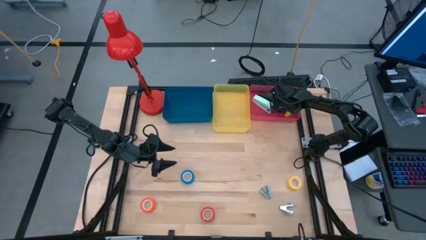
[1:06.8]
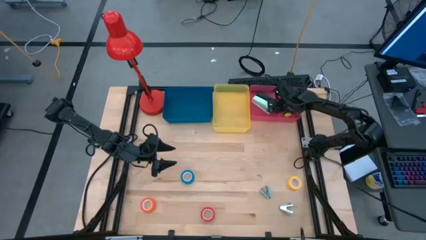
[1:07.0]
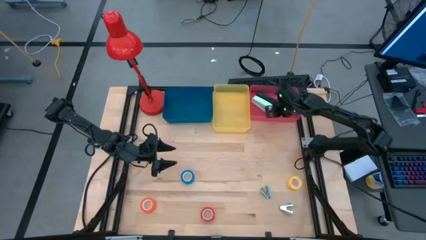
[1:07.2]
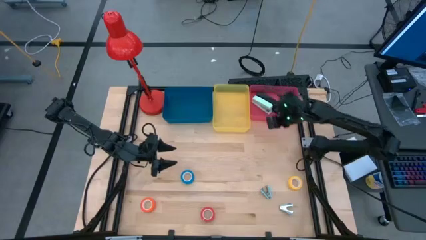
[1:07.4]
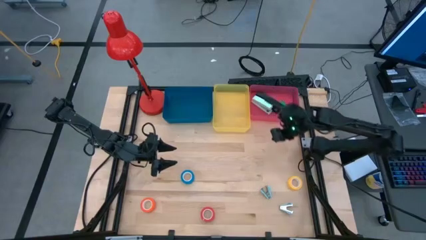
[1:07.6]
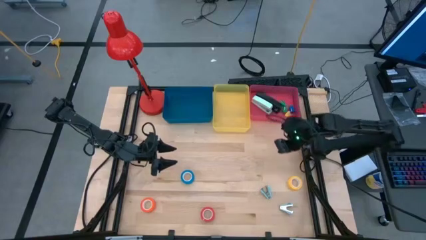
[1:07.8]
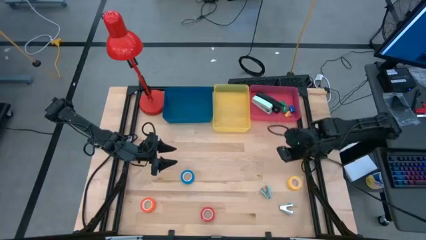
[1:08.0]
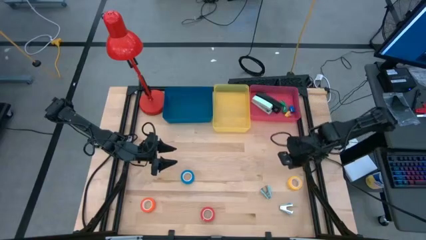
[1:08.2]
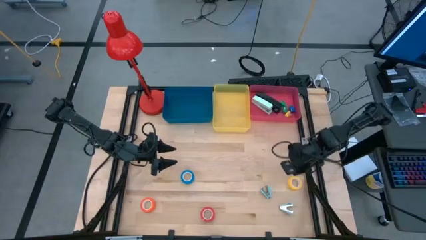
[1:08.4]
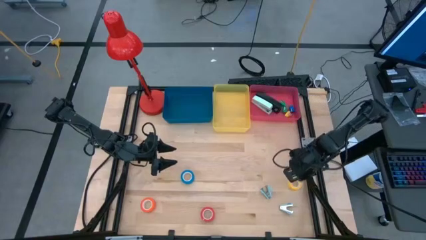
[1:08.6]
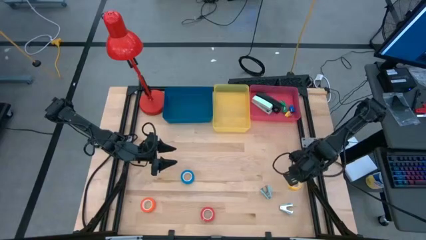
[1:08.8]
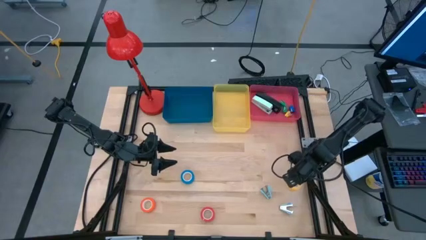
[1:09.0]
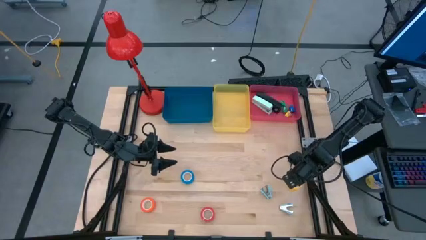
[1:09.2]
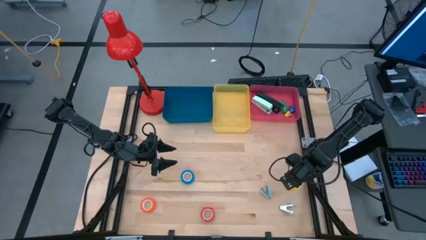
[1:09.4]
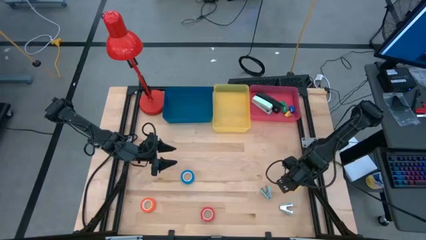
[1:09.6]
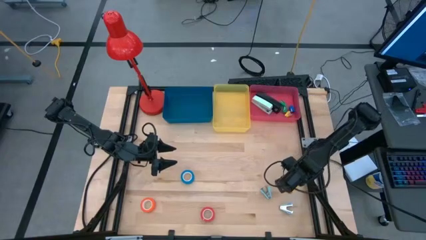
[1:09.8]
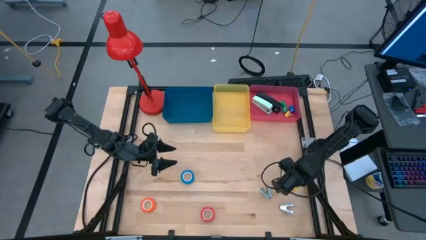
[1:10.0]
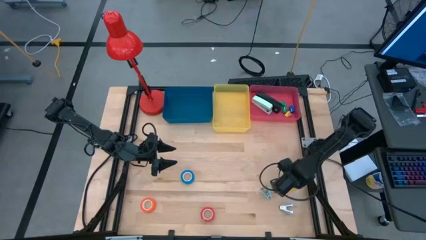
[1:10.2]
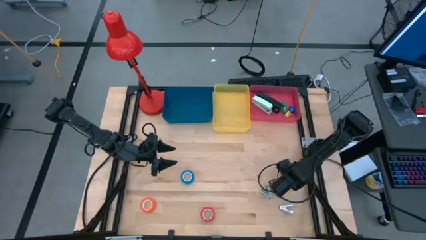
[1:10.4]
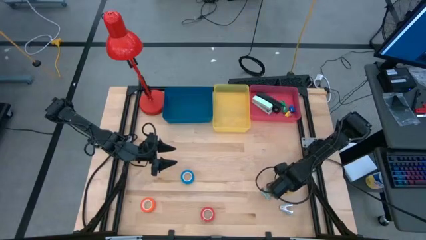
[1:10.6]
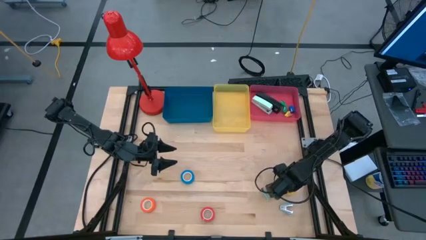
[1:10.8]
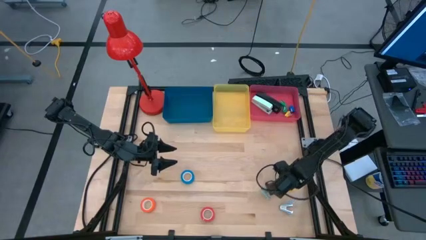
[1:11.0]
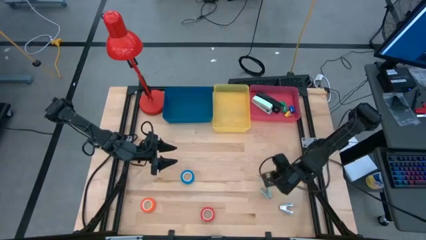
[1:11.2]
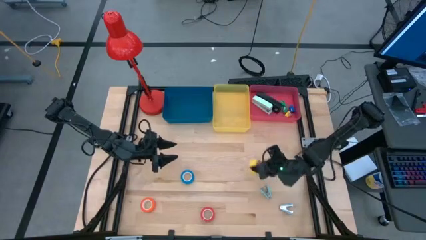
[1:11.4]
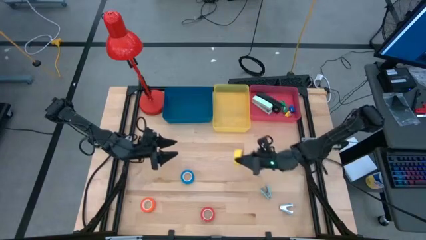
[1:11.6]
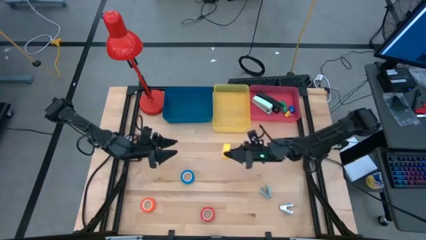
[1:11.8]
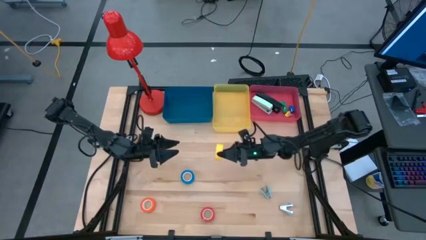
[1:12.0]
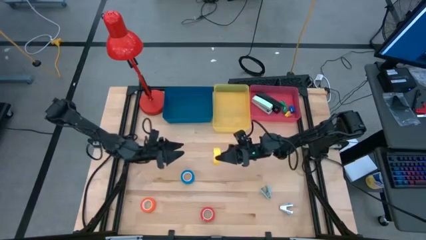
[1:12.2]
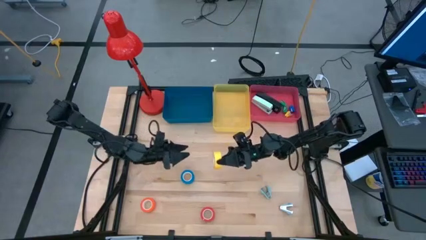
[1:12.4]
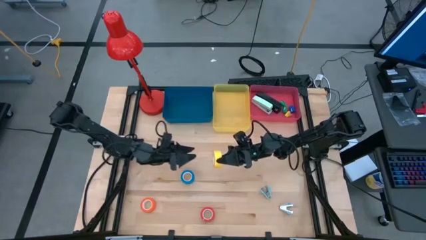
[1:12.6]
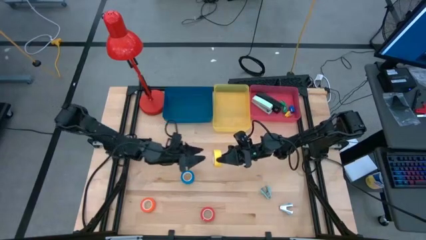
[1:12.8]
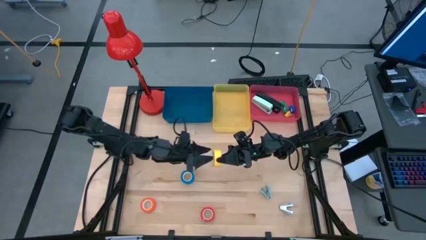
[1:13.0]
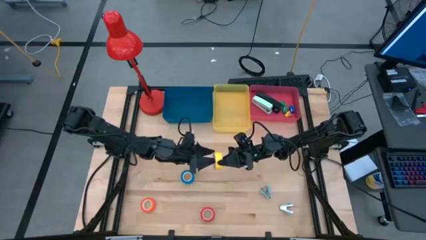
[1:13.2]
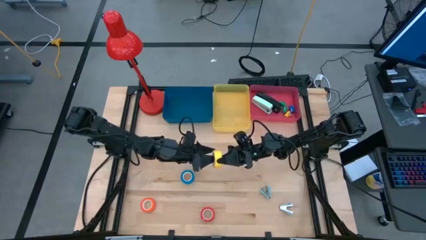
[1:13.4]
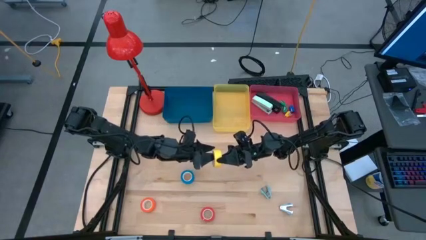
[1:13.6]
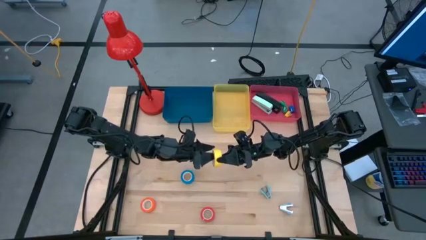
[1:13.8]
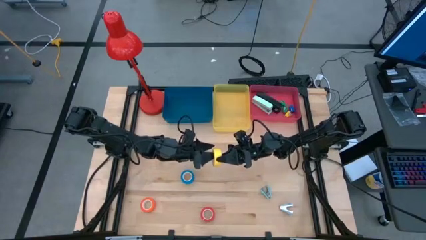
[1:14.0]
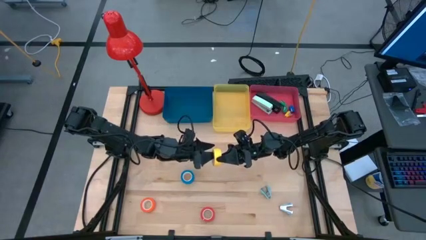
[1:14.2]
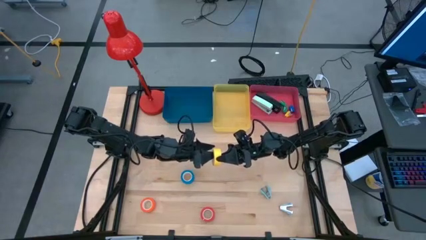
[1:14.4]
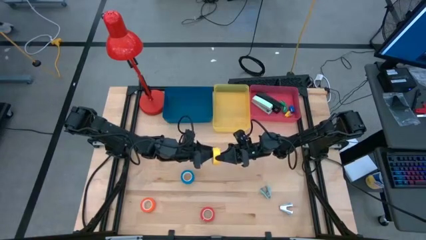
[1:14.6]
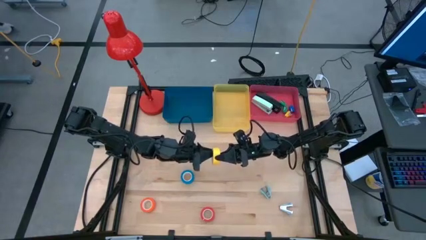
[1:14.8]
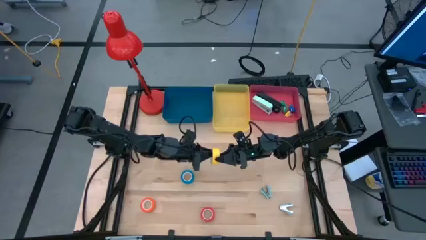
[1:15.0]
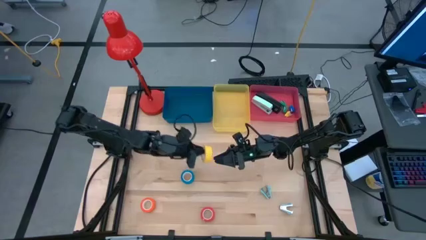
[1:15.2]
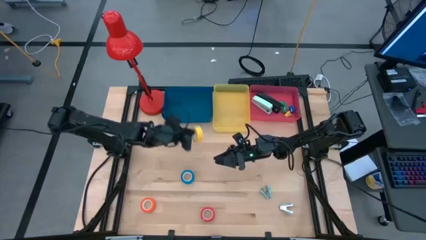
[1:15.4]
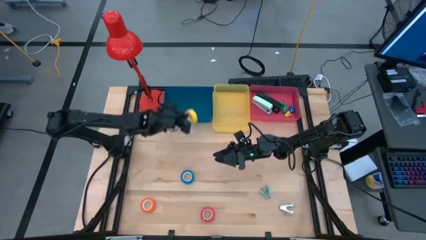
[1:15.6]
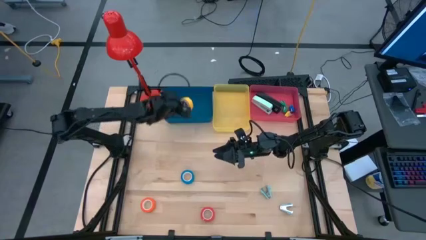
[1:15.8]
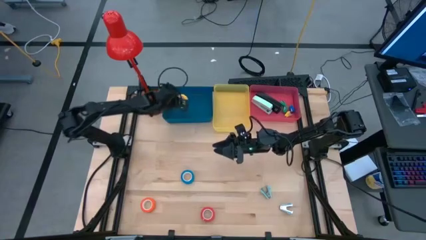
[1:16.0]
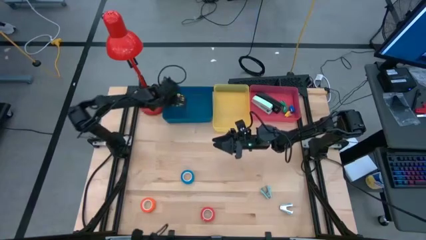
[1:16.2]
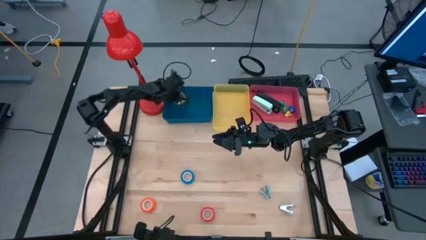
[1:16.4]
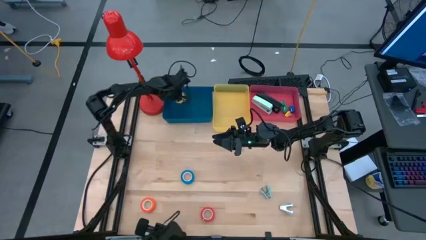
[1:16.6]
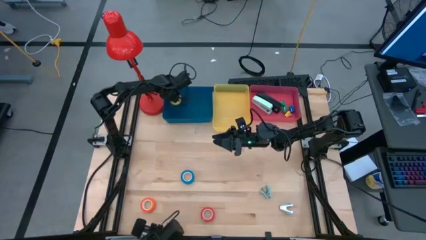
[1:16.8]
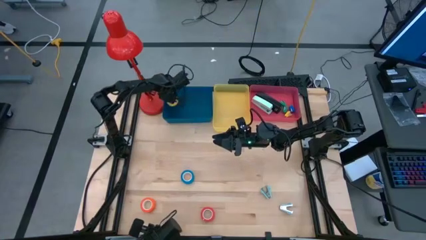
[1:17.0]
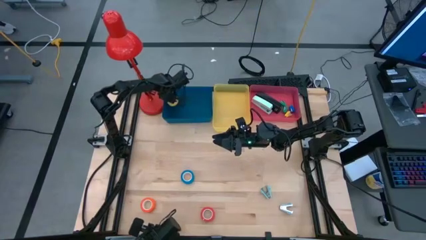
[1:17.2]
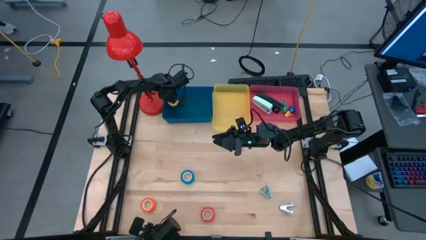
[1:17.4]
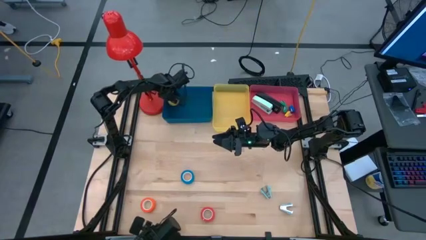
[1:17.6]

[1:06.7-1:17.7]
Task: Pick and place Stapler, Stapler remover, tape
Put the yellow tape into the blue bin

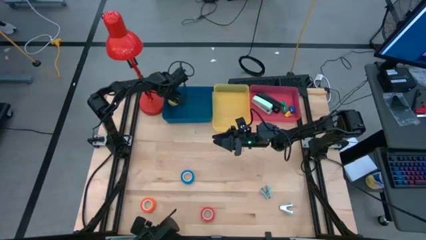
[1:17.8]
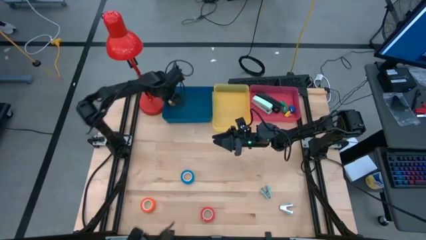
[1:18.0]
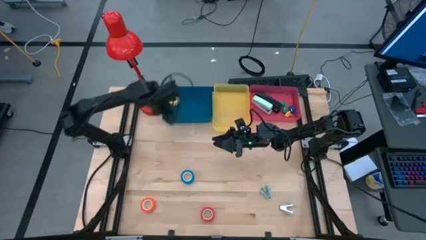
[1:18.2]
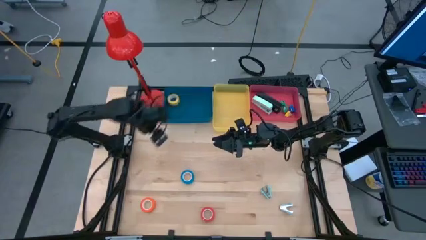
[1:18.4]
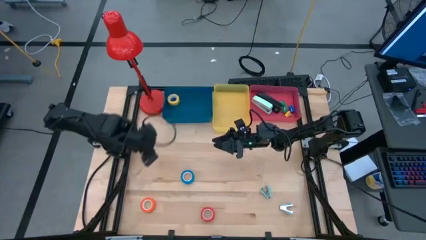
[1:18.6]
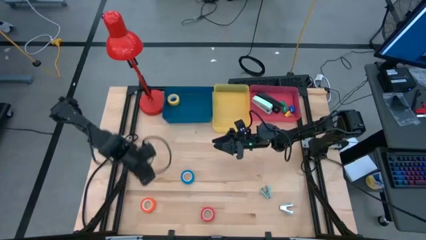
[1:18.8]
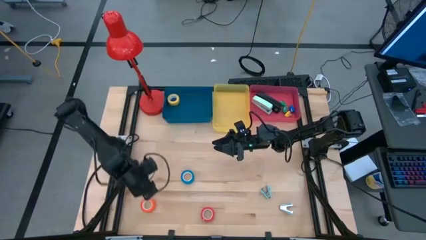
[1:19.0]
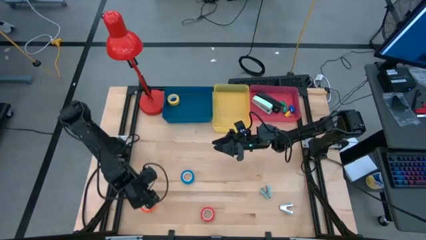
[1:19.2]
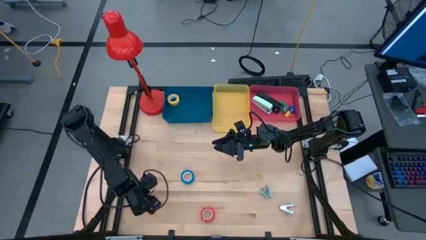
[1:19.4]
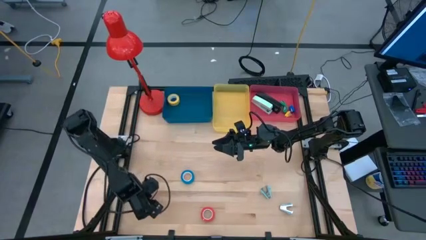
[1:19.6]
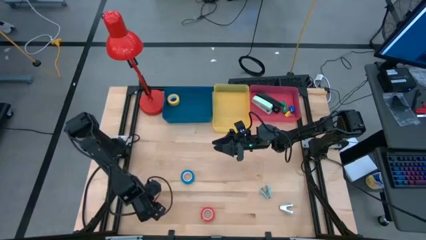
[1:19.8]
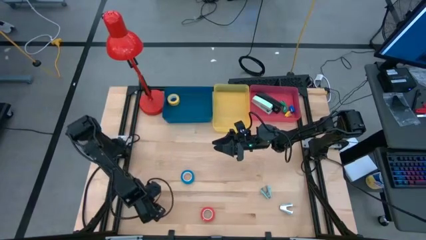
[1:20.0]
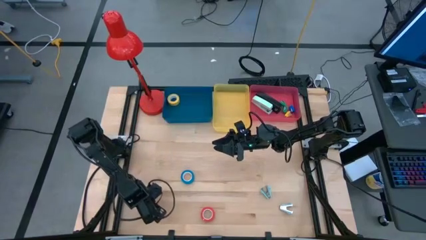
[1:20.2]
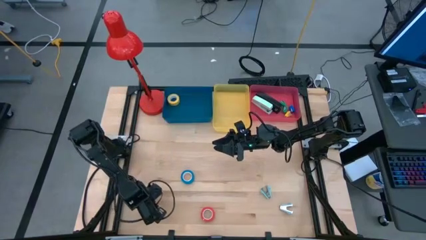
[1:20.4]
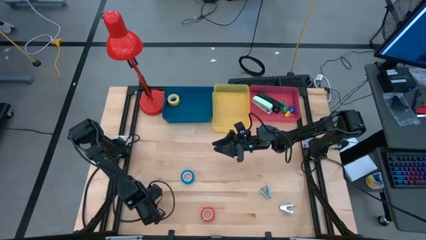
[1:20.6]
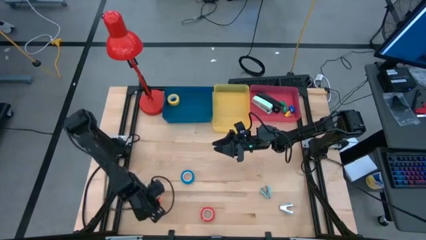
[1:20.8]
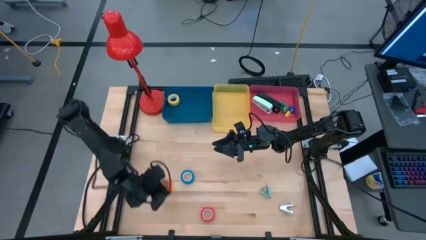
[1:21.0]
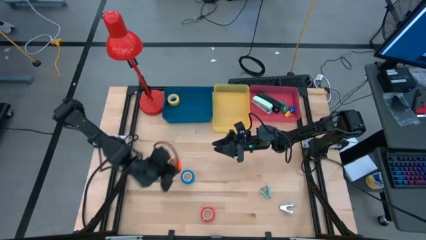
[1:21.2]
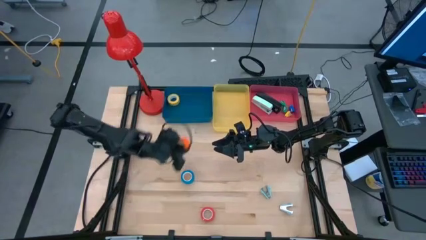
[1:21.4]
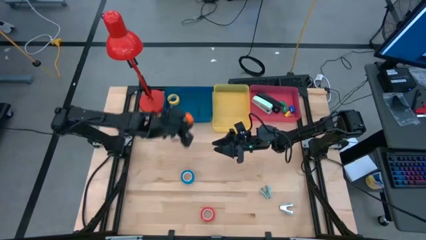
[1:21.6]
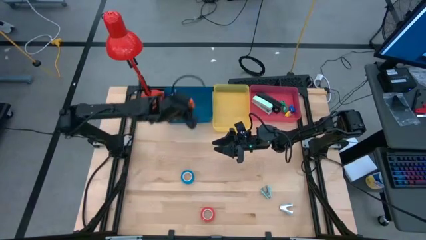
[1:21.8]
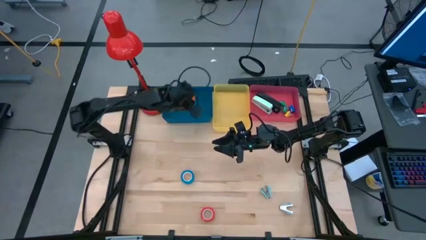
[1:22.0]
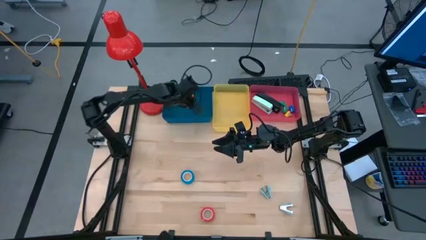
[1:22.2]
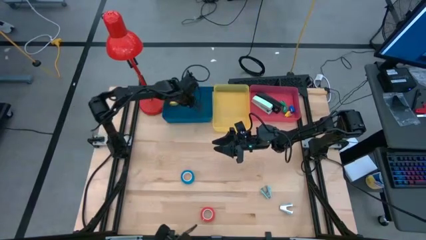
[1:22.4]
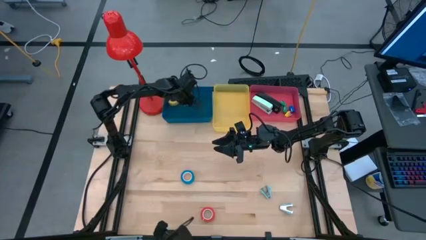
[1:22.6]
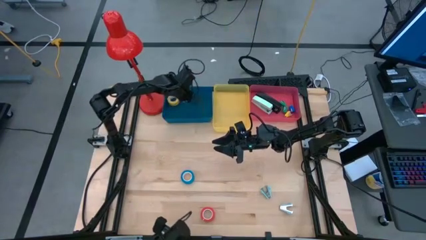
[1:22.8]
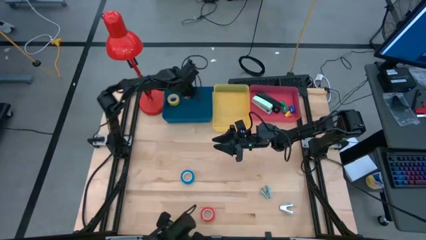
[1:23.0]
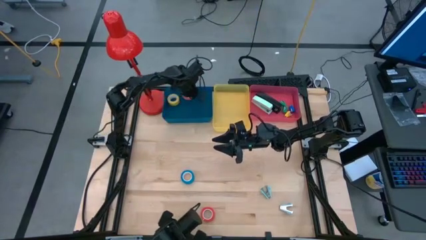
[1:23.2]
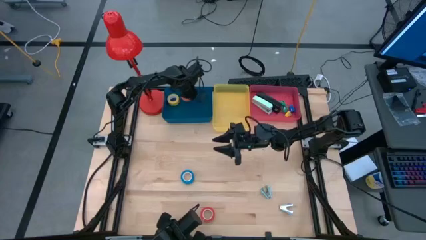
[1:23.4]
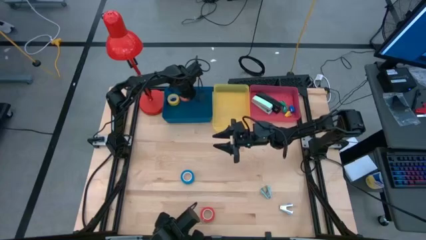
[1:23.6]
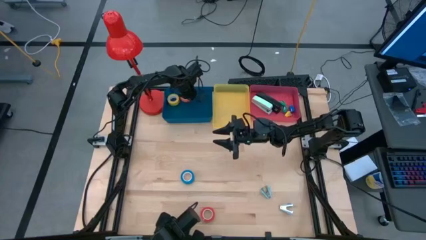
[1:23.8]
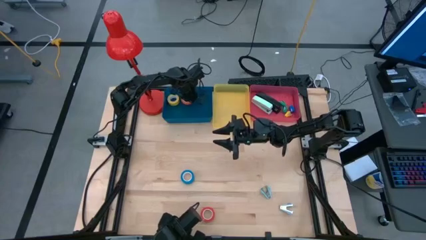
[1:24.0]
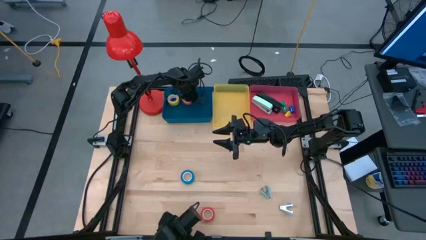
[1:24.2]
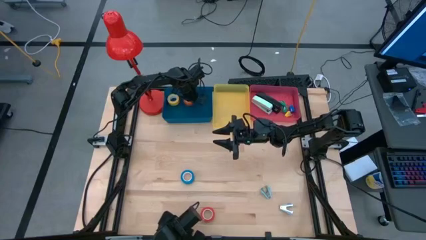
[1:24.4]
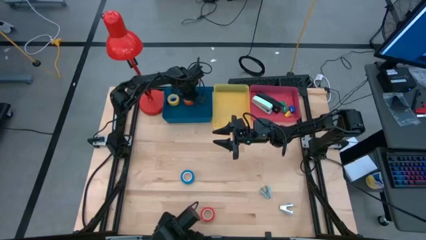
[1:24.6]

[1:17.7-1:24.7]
Put the orange tape into the blue bin
